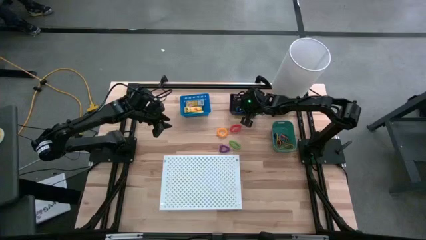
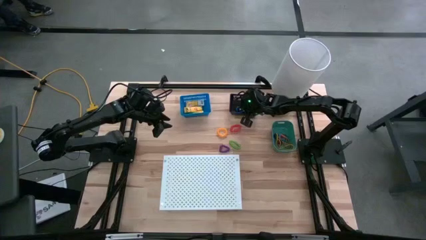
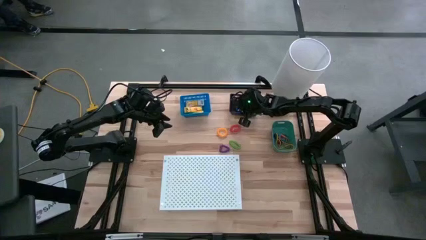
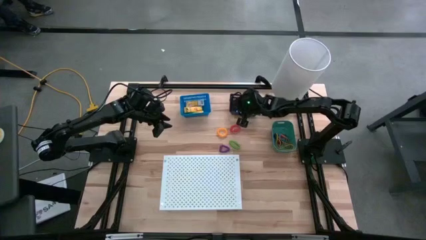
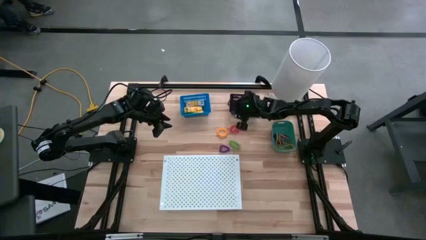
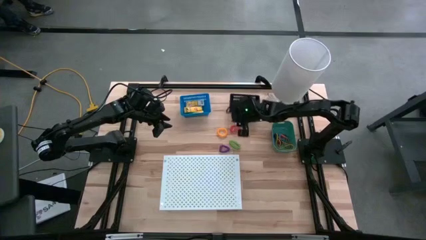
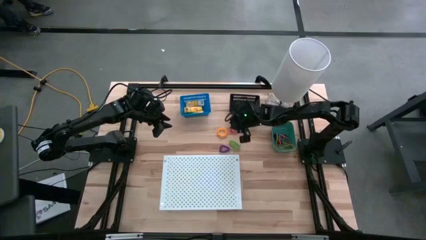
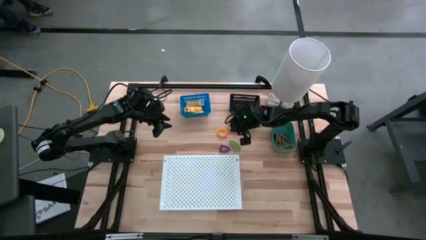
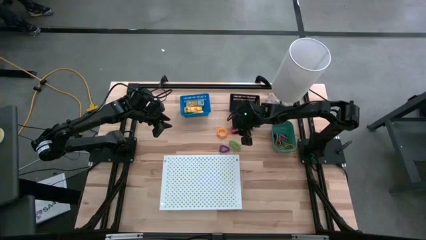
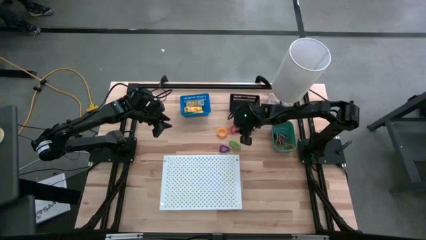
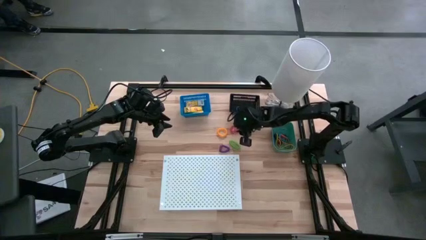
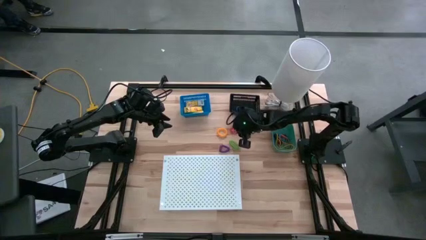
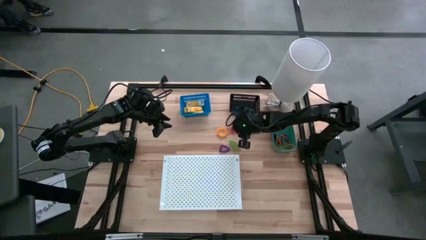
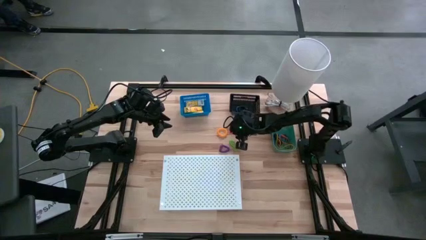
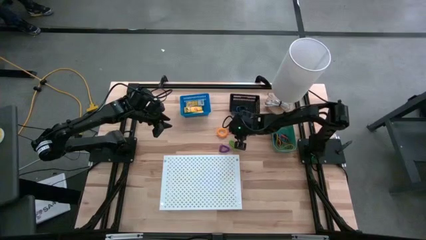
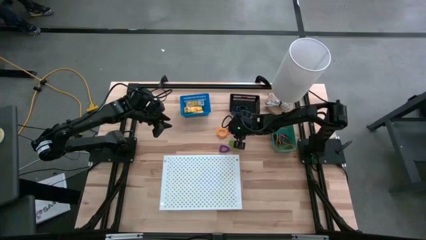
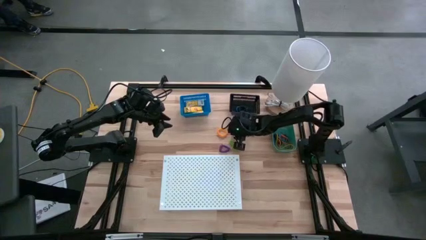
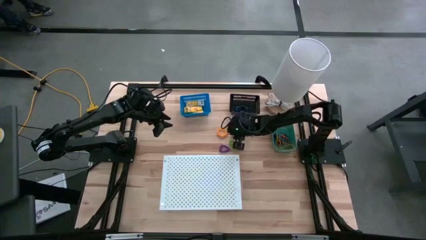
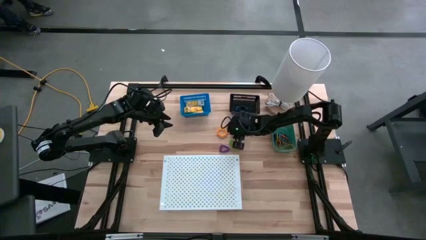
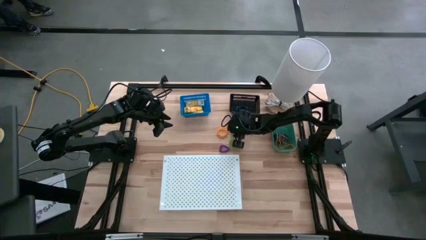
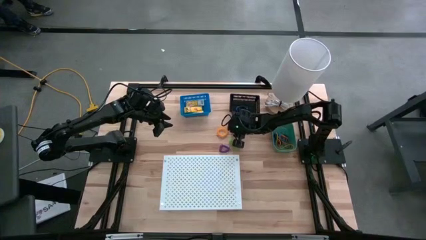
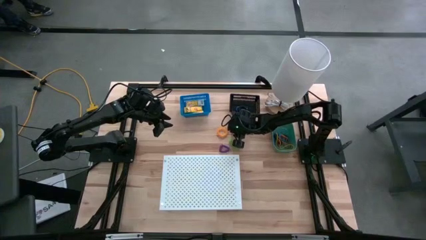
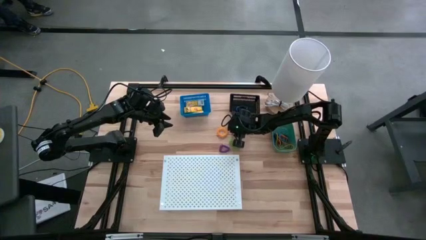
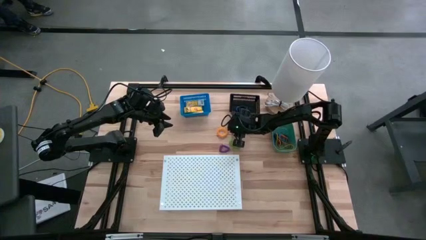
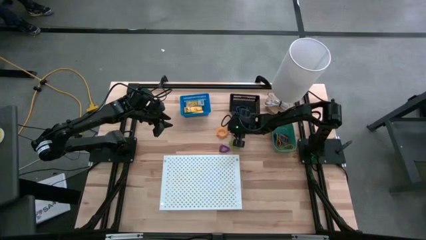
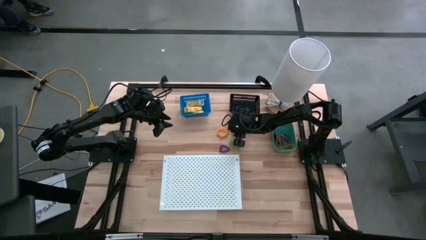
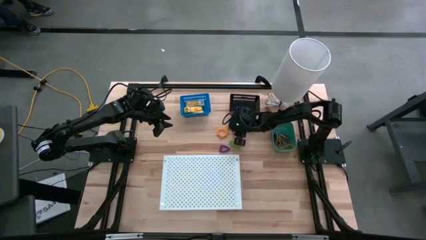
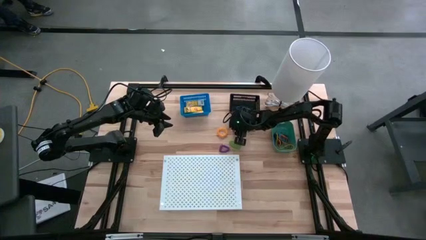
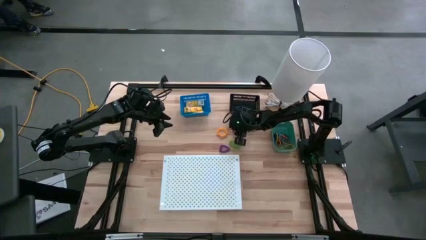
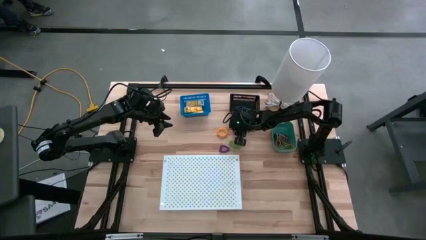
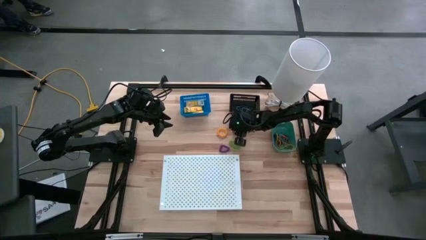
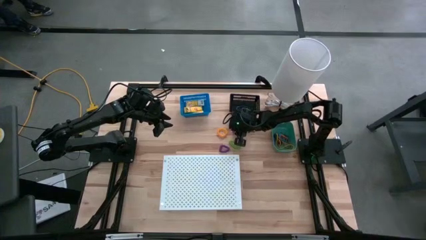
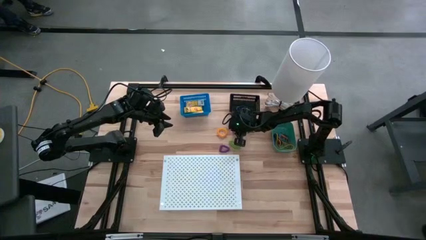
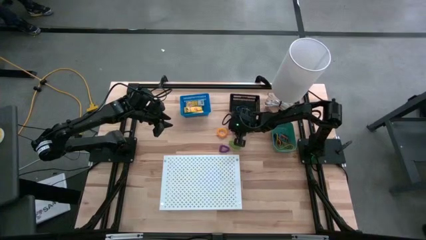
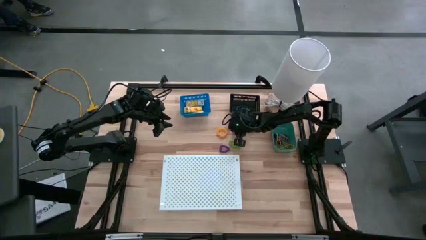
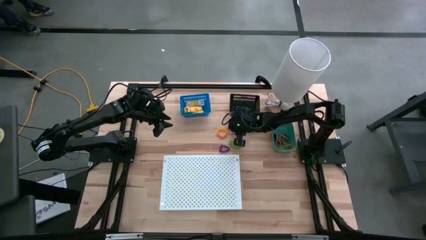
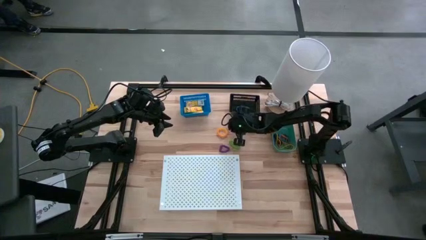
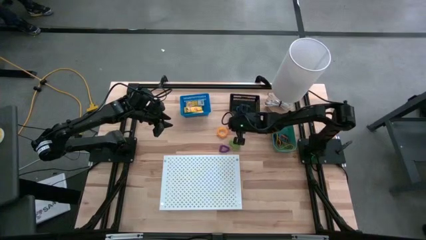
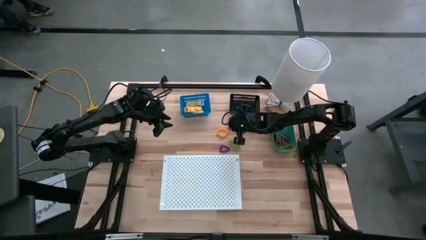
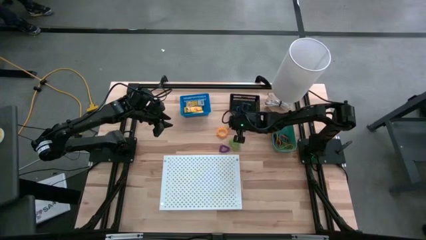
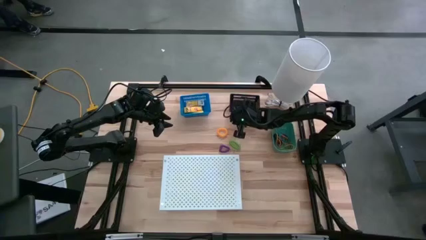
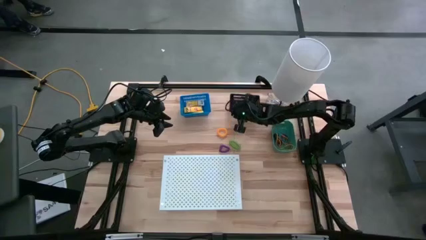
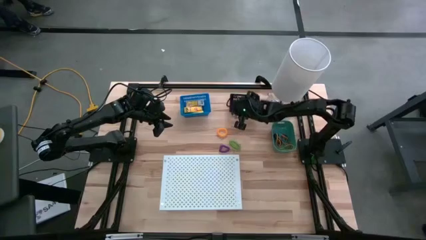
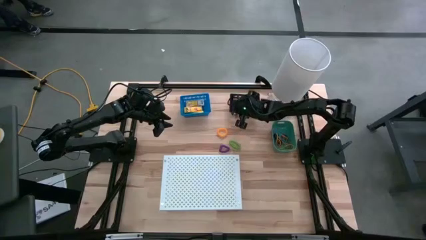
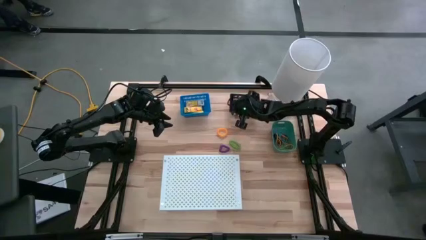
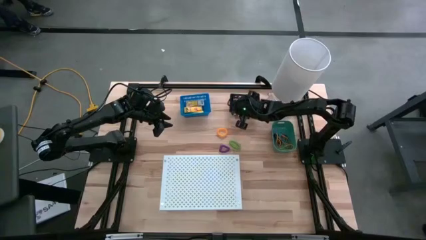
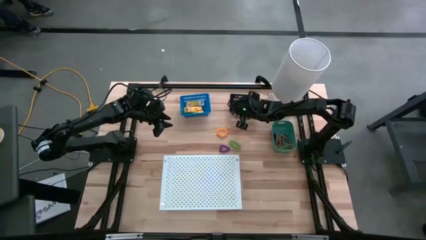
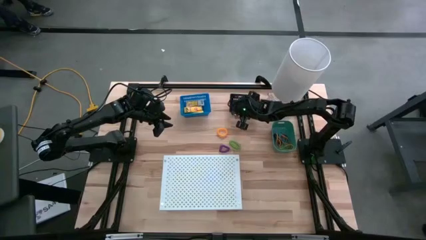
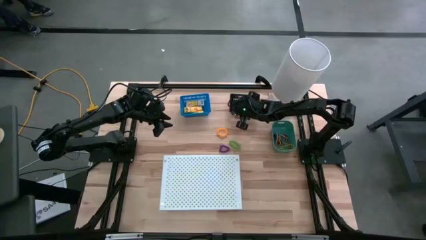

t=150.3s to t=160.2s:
Task: Pick & Place Office Desk Supplies
Put the orange spring keychain into the black bin

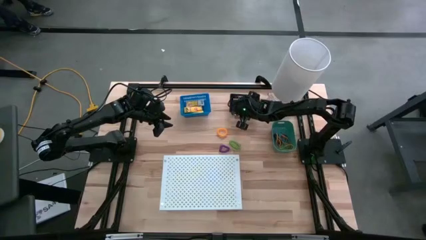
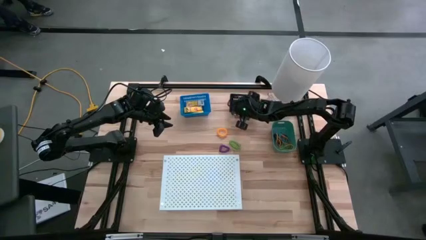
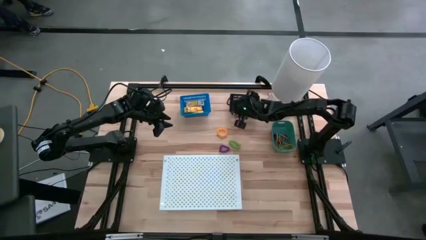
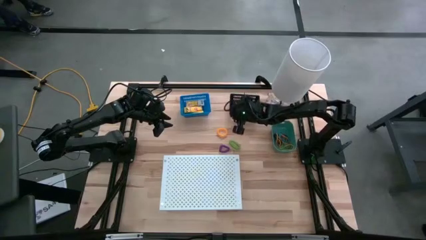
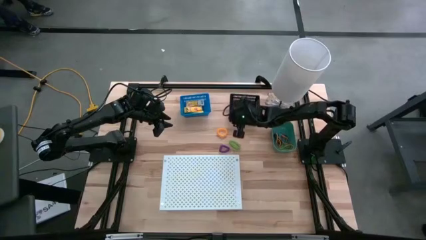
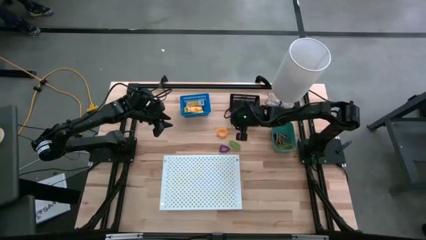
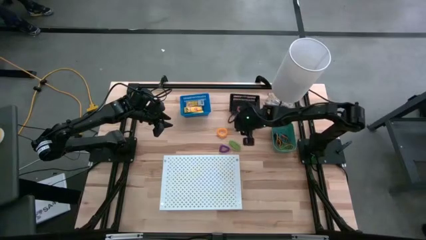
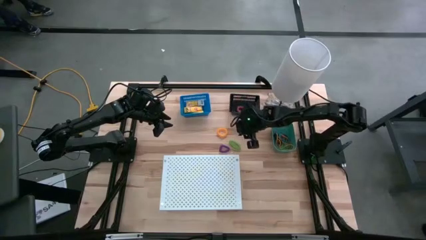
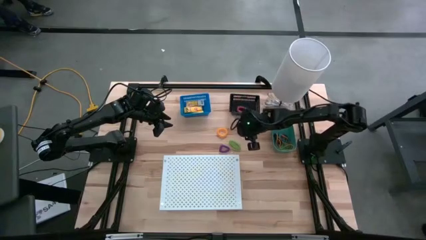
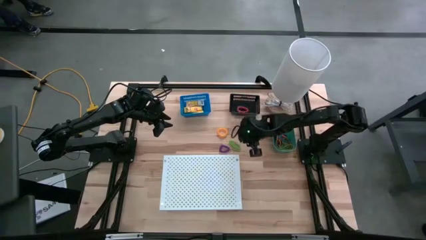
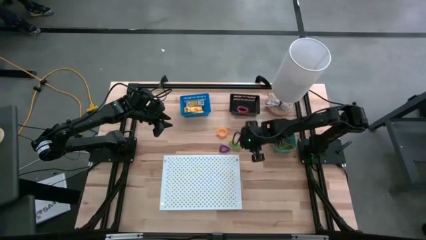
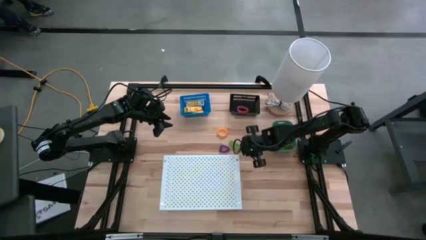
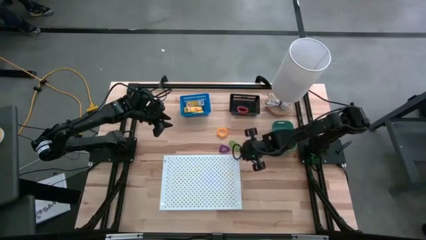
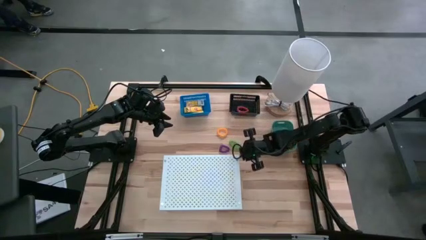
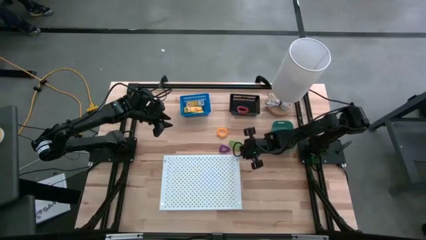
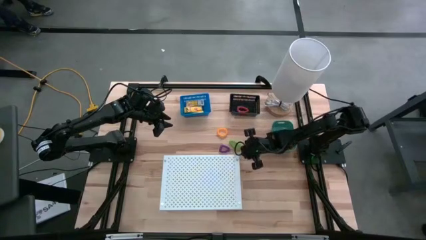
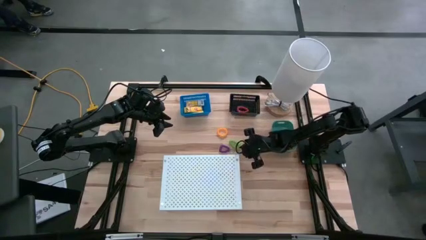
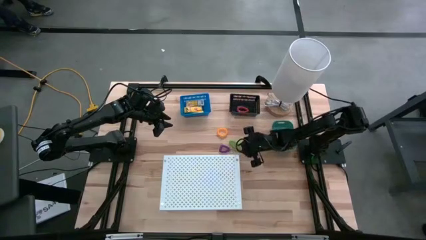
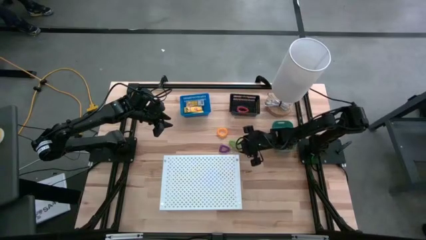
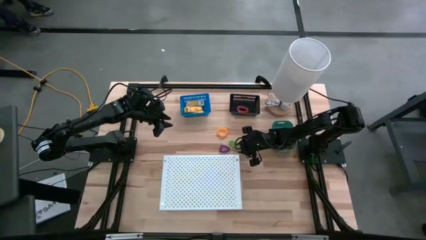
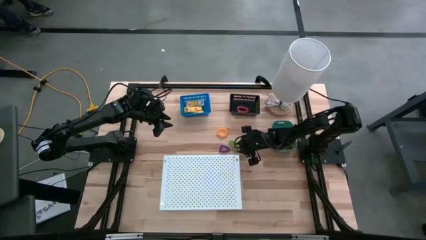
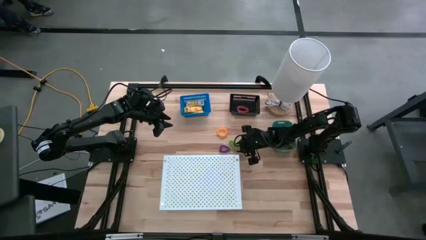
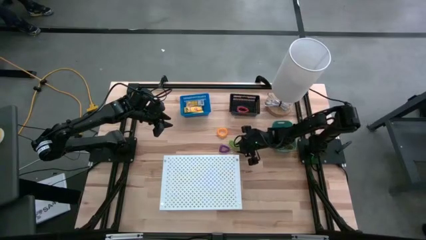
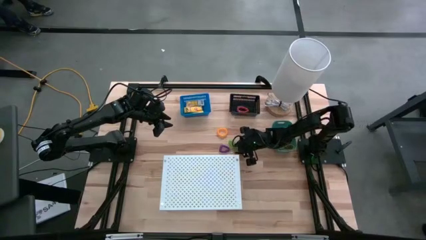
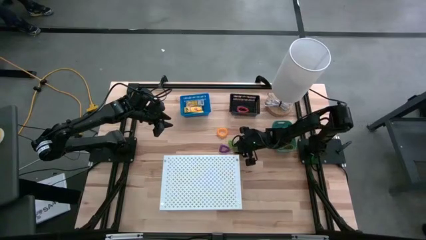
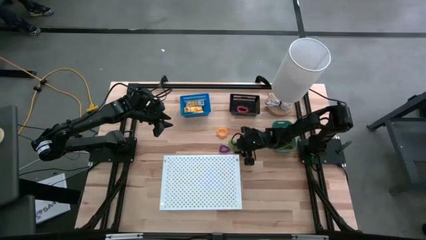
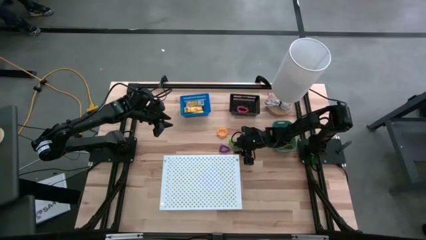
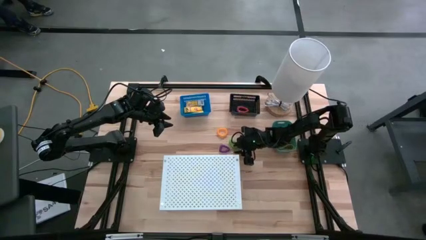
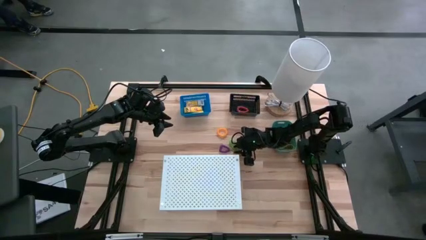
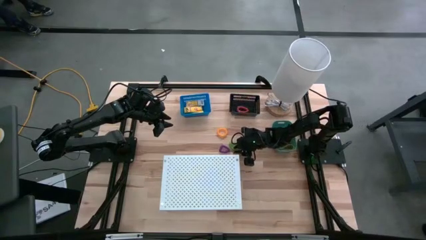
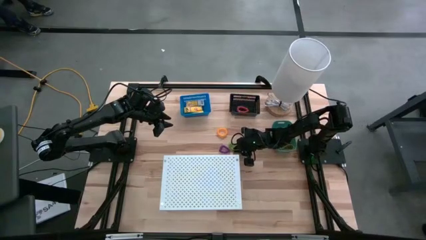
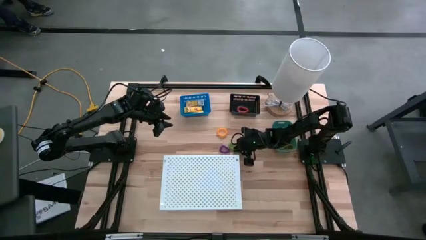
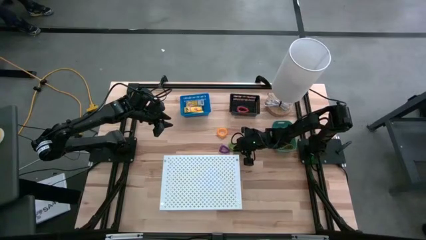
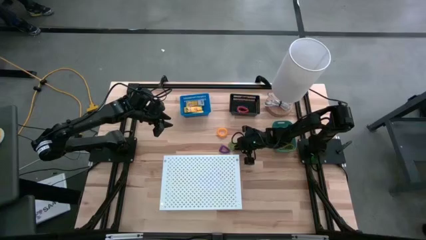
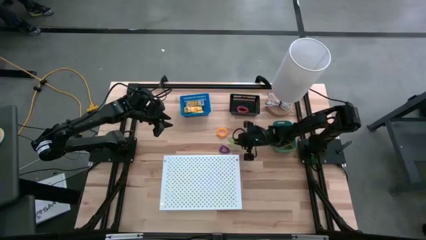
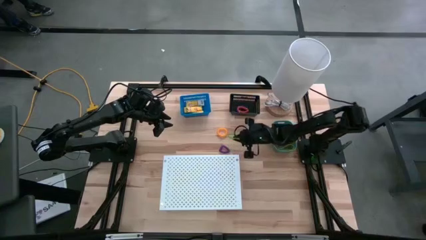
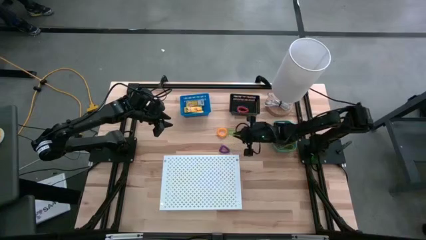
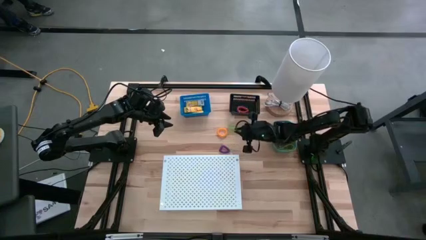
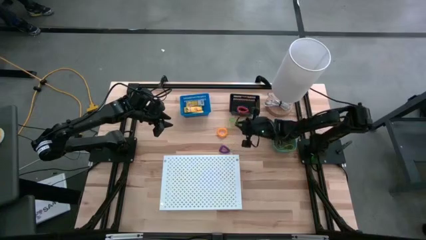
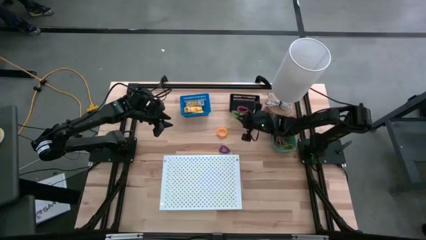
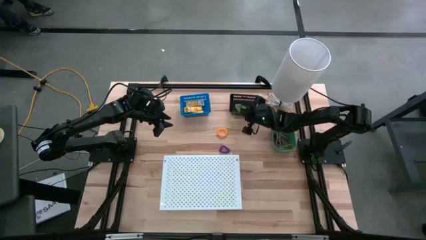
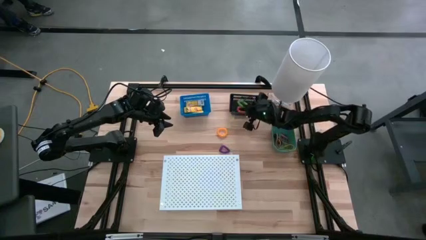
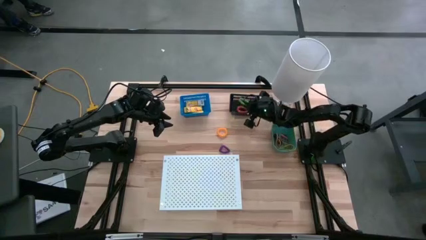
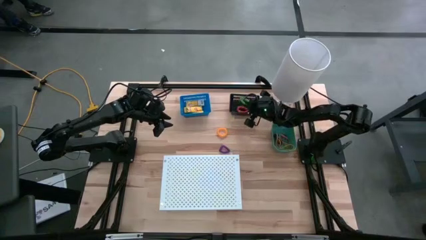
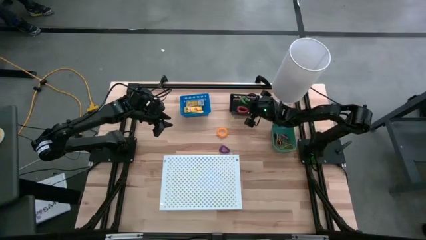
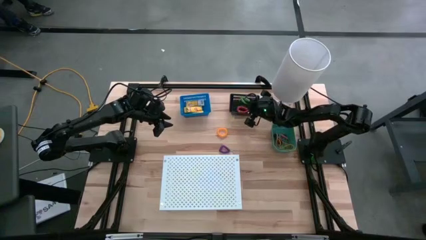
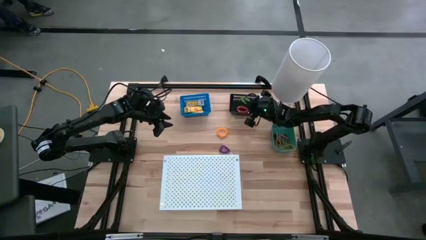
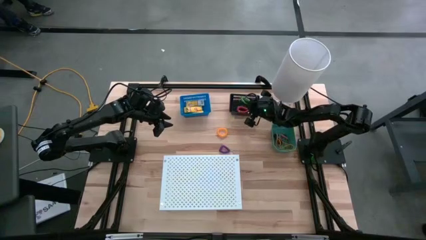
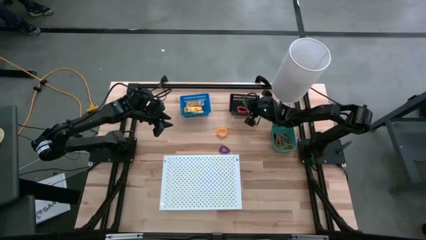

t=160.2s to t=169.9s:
Put the green spring keychain into the black bin
